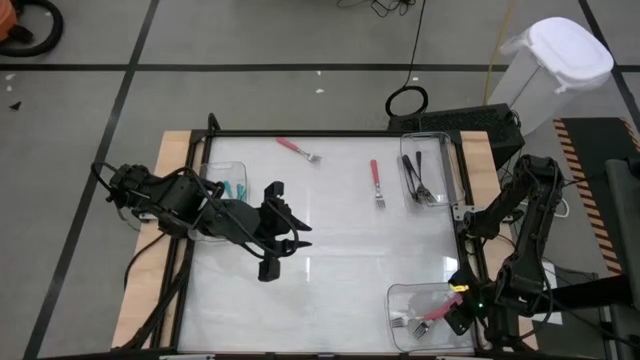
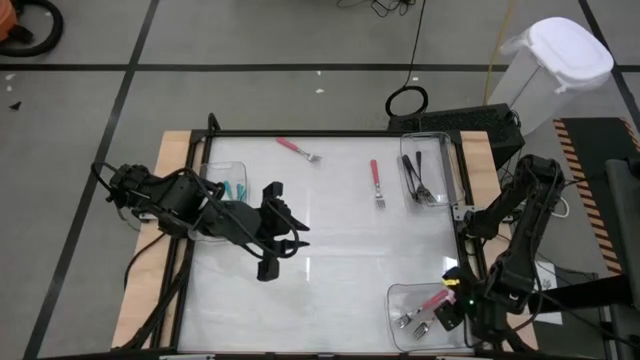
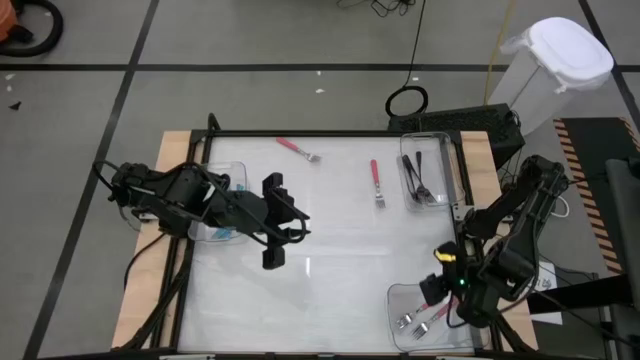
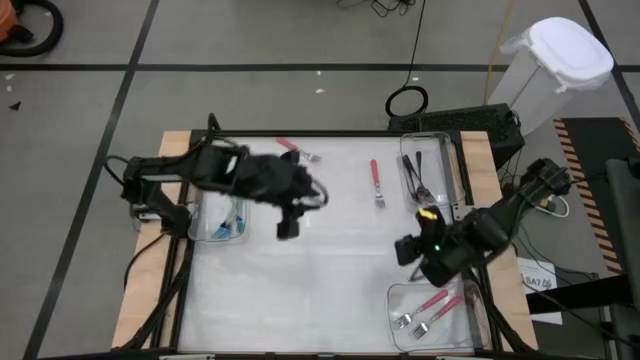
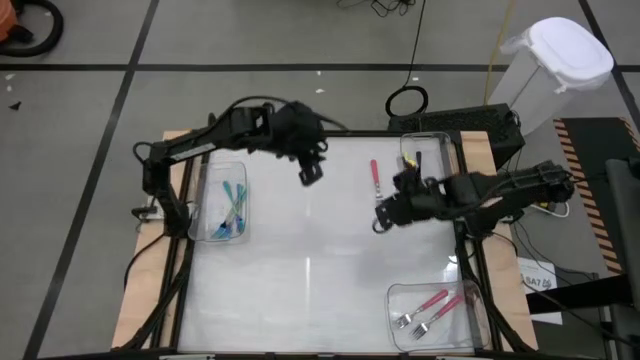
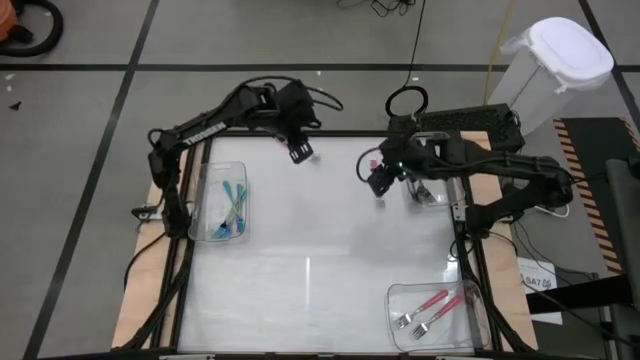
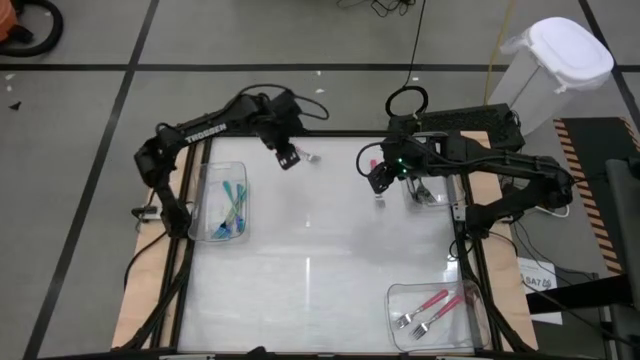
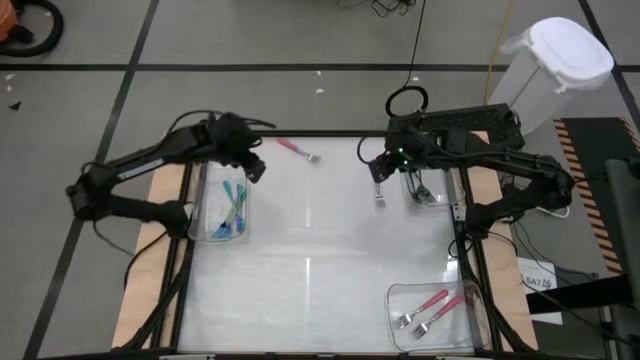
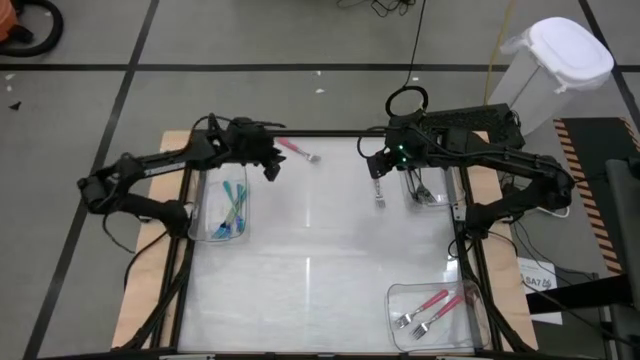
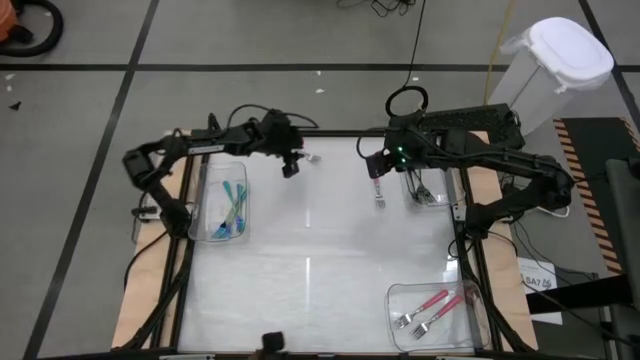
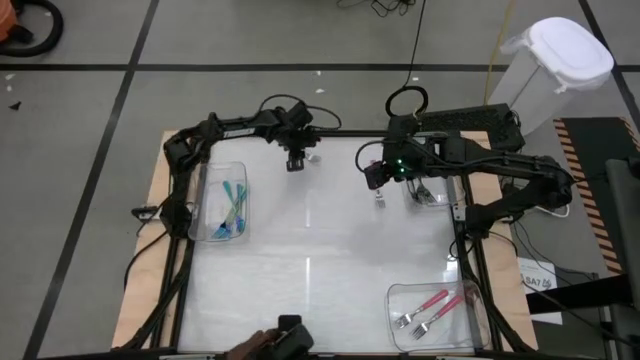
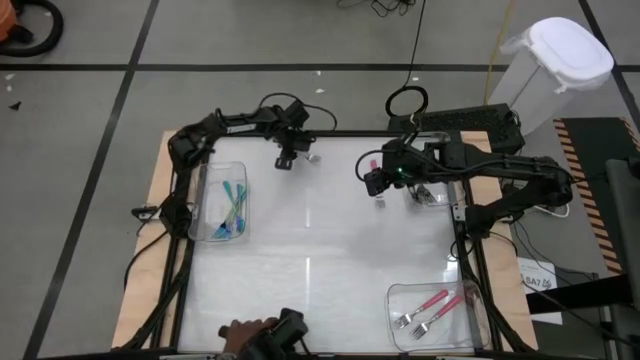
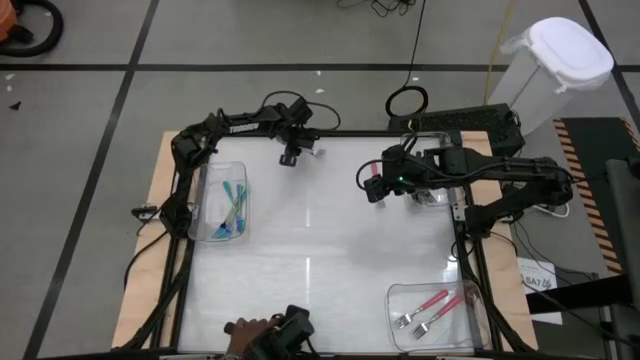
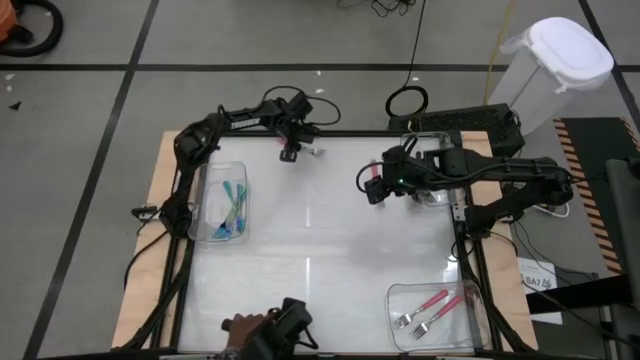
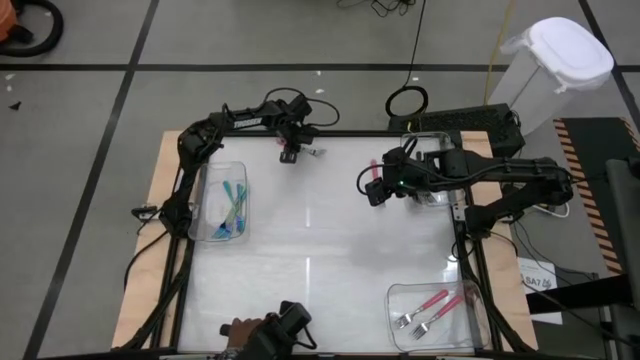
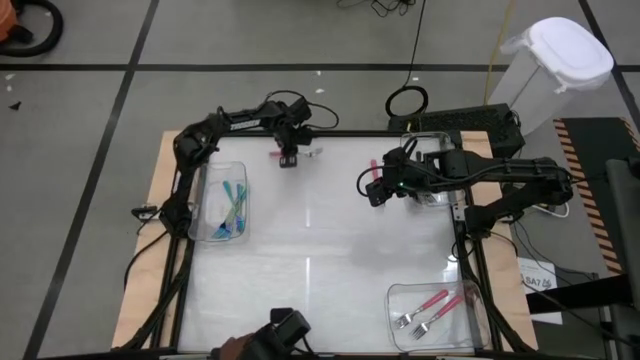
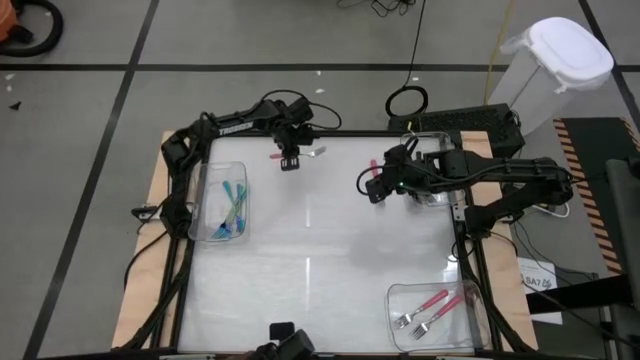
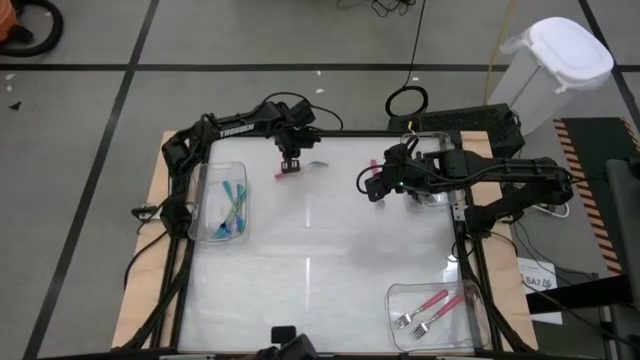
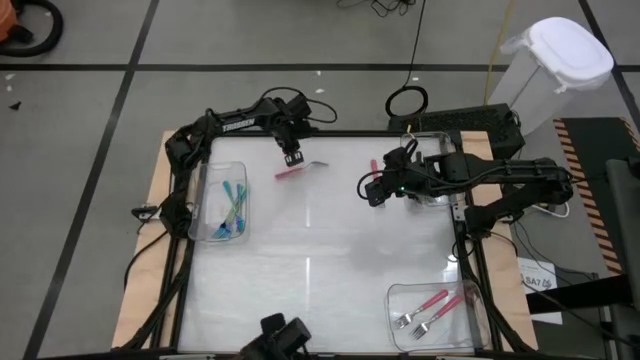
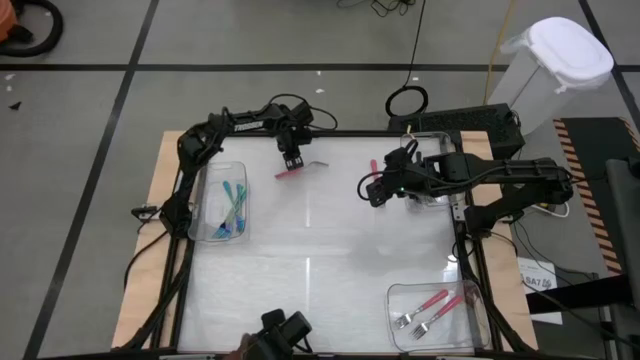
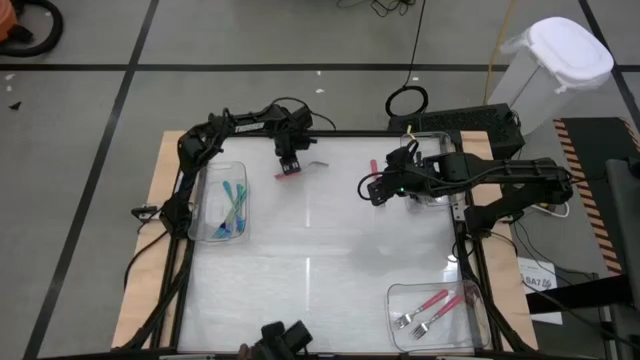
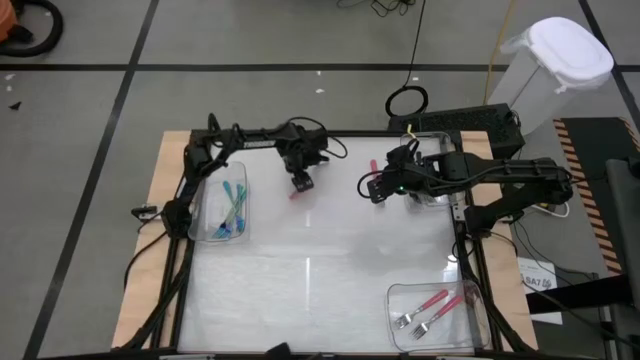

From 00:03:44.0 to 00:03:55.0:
Task: Sort silverware by color (type)
Put the pink fork into the bottom right transparent bin

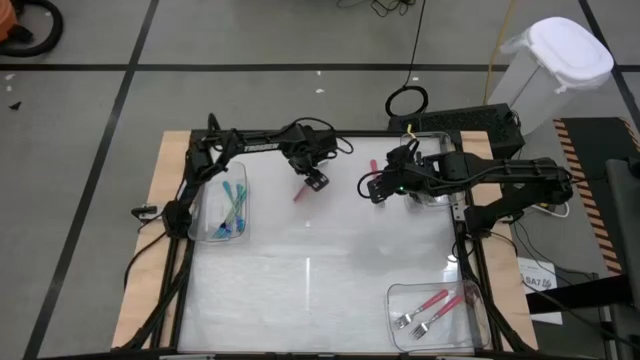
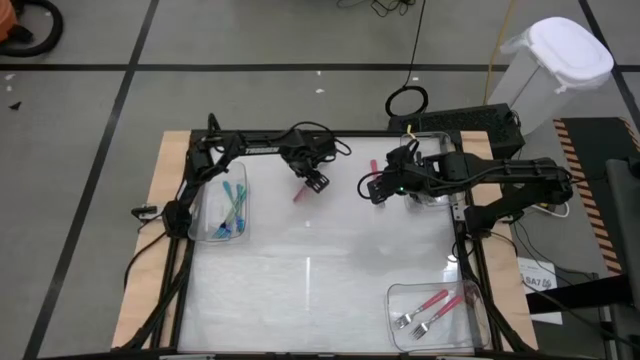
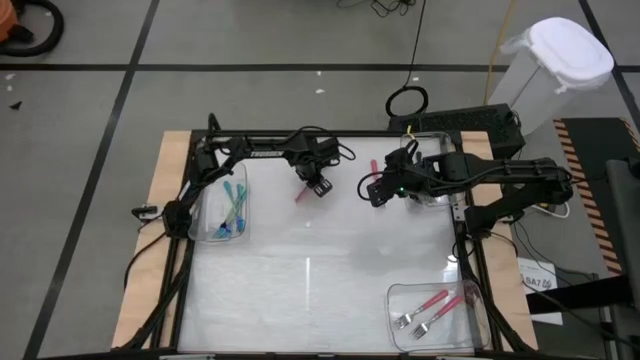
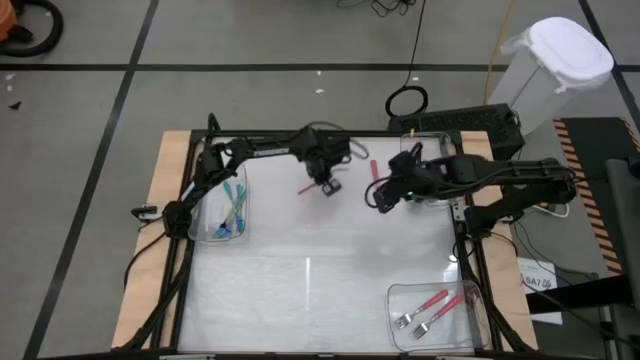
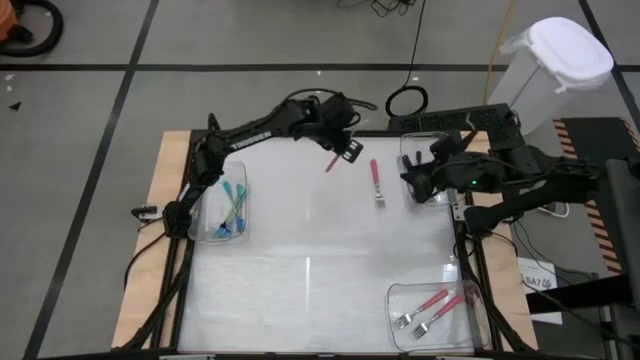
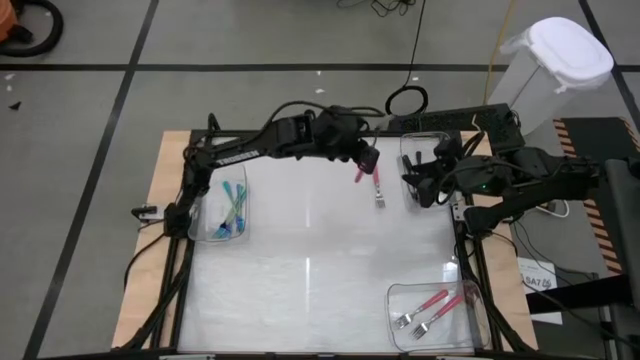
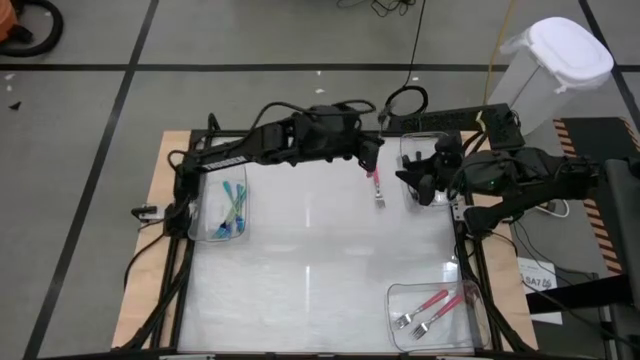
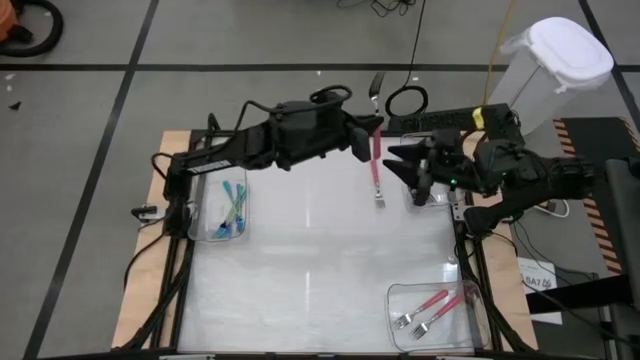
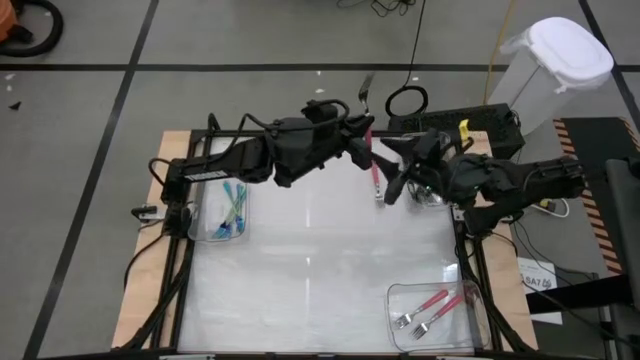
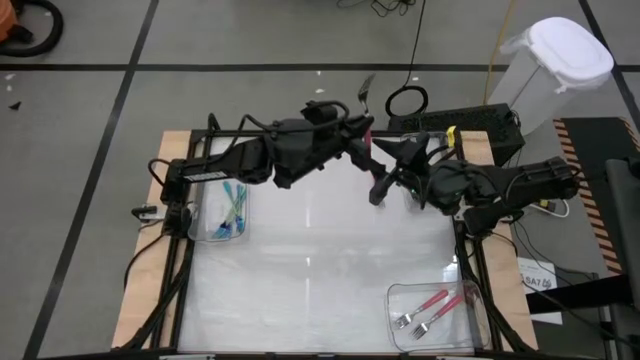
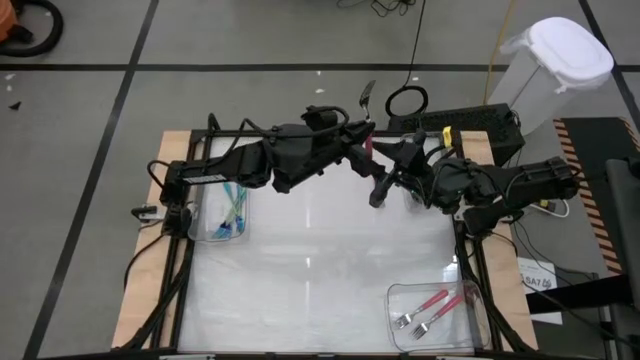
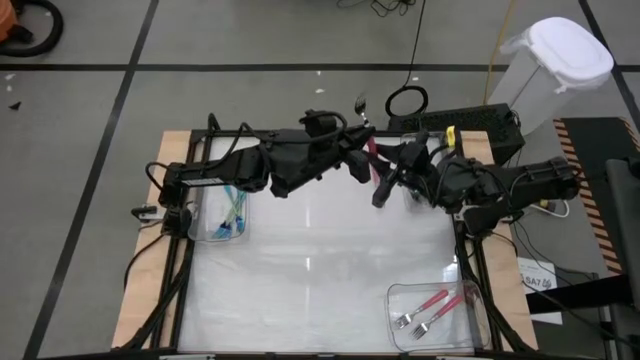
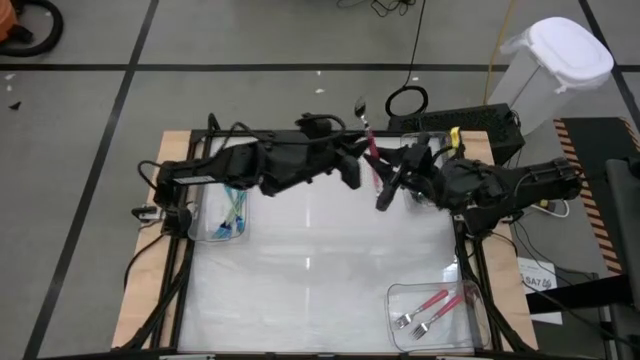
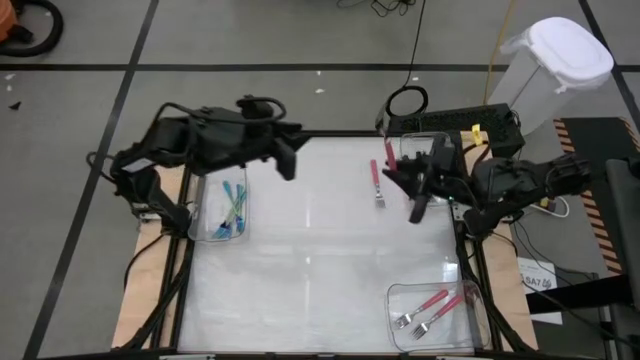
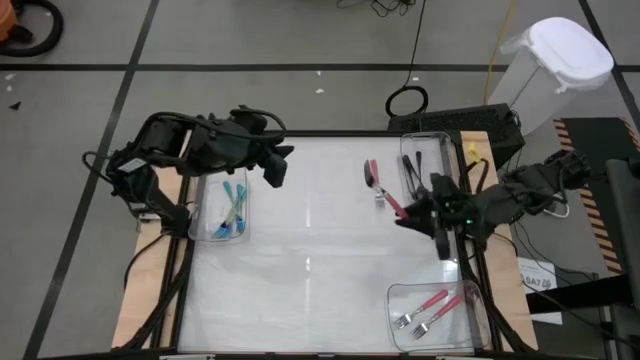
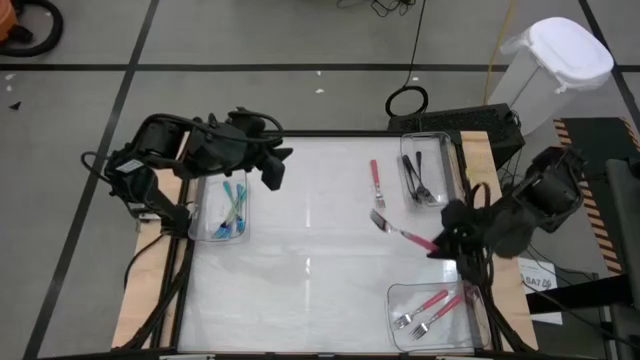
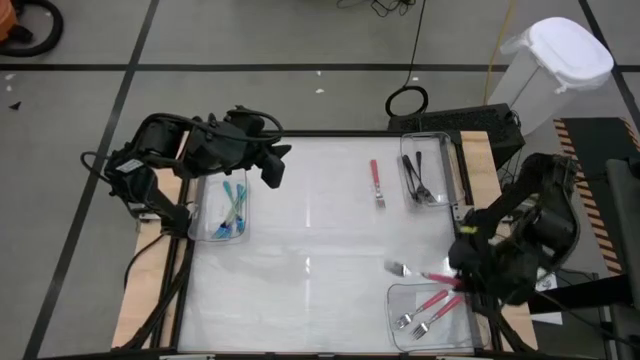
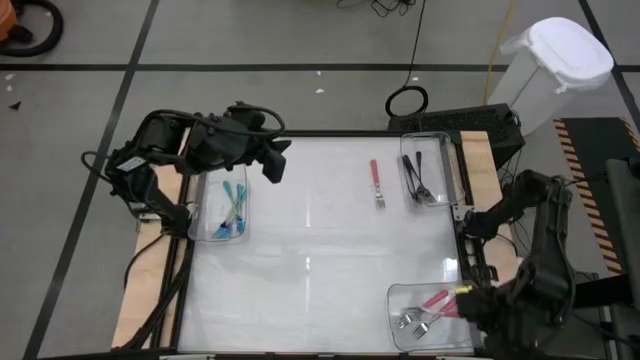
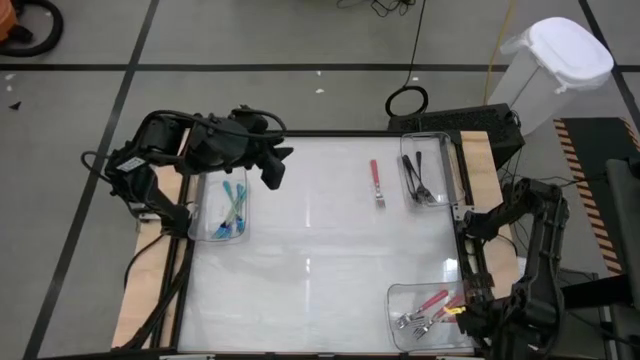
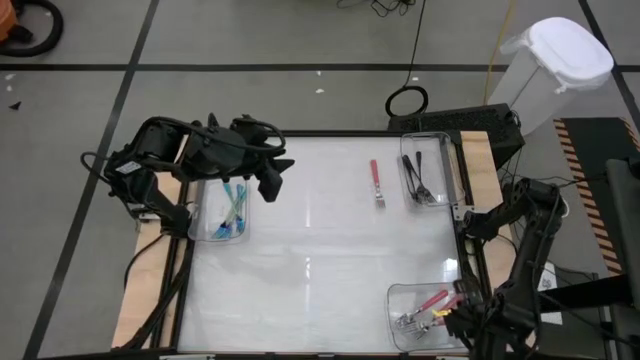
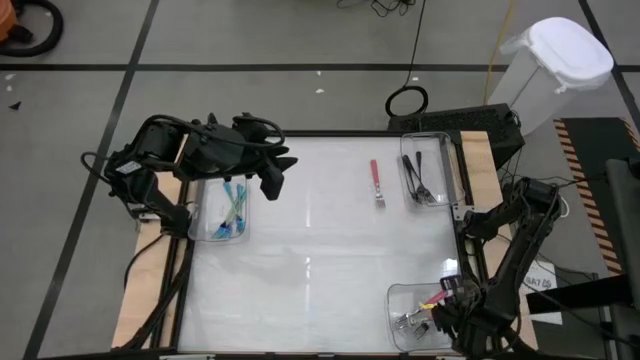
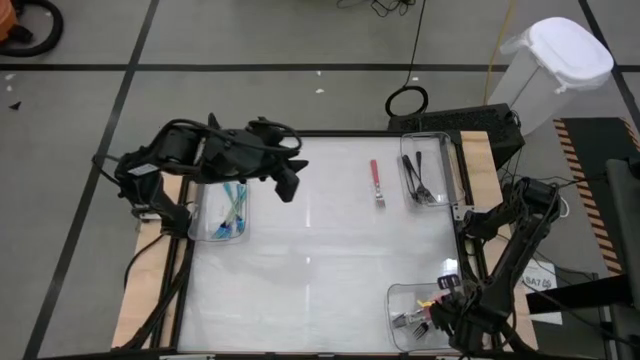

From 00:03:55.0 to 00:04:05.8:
Put the pink fork into the bottom right transparent bin
